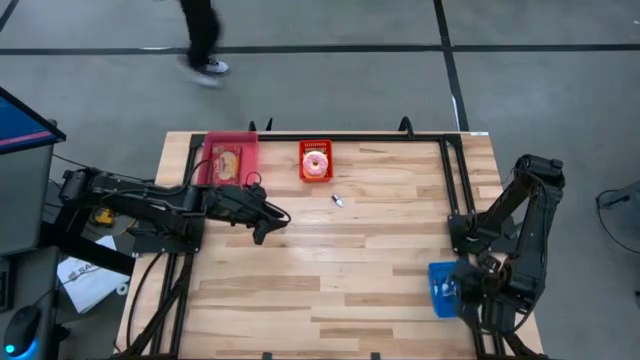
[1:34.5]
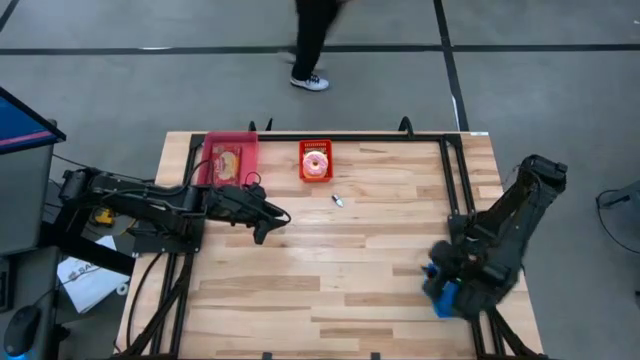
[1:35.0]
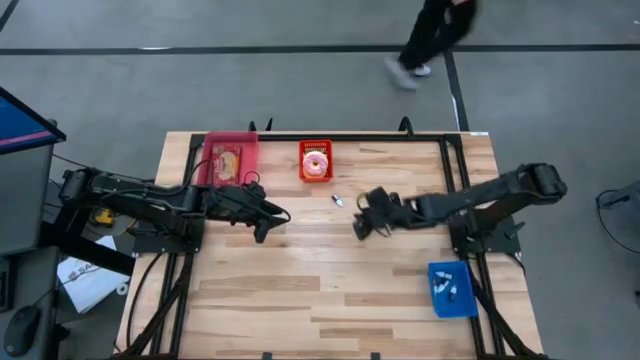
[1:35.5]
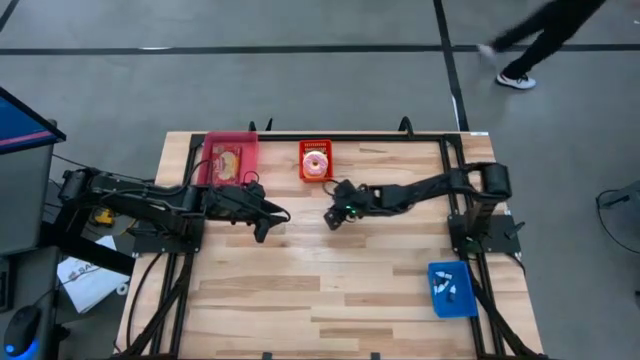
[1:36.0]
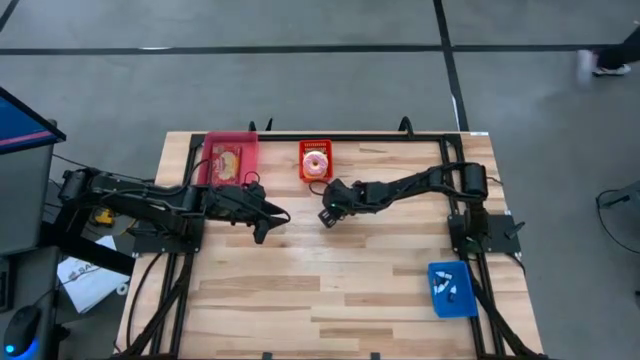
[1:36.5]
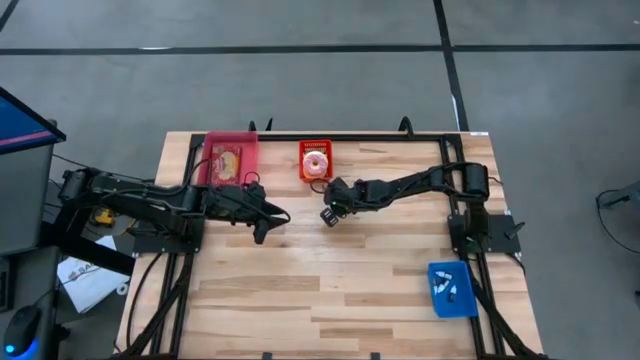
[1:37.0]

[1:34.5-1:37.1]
Put the red food coloring into the blue bin

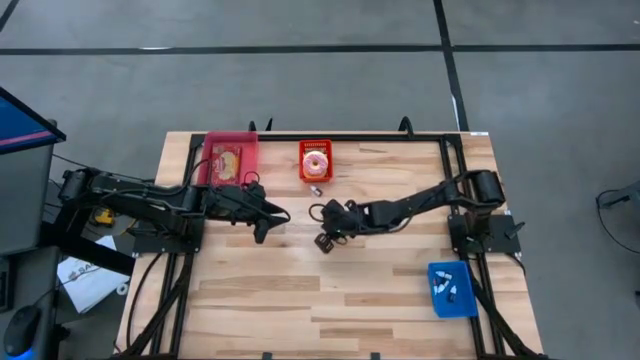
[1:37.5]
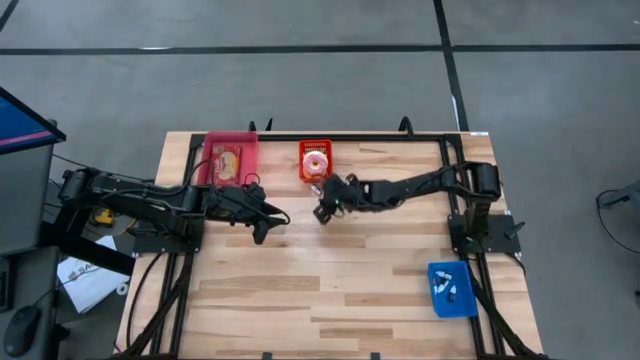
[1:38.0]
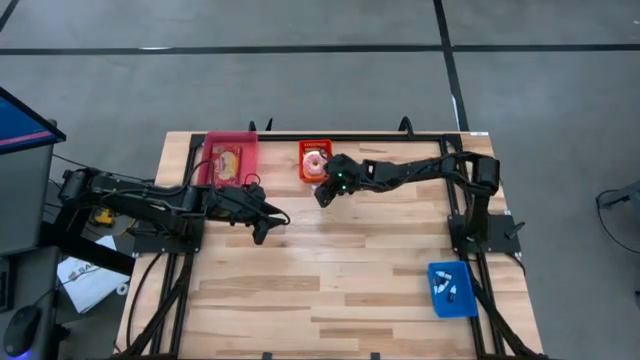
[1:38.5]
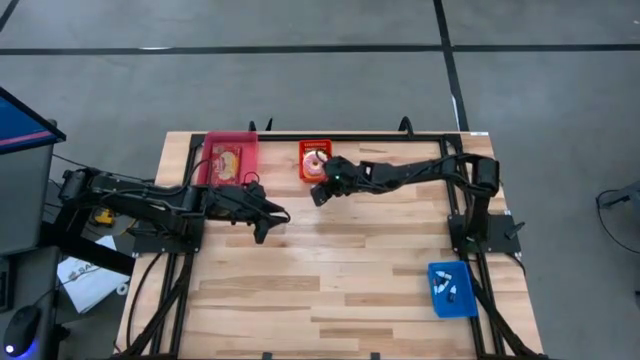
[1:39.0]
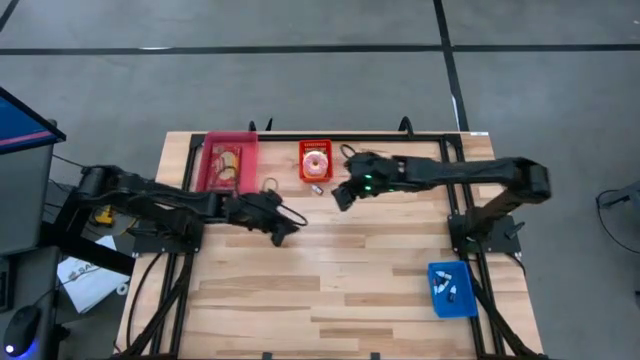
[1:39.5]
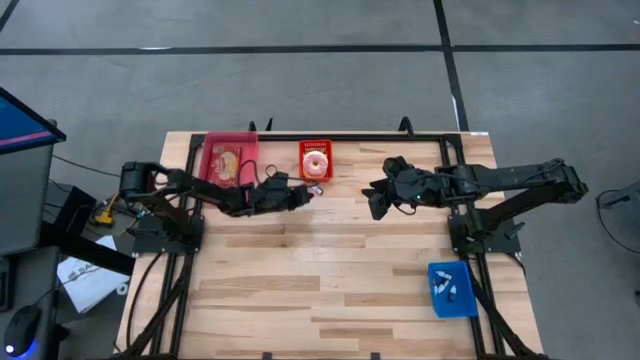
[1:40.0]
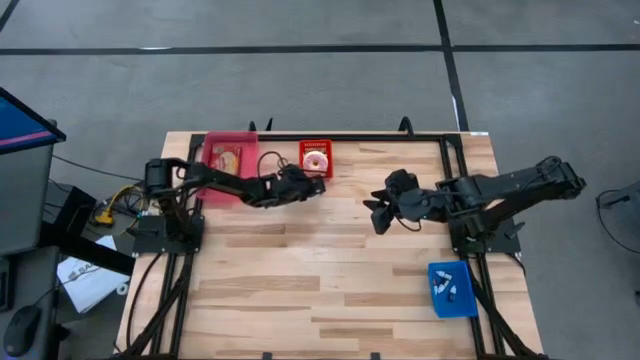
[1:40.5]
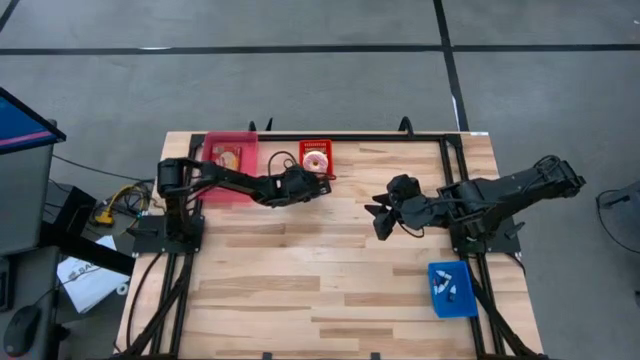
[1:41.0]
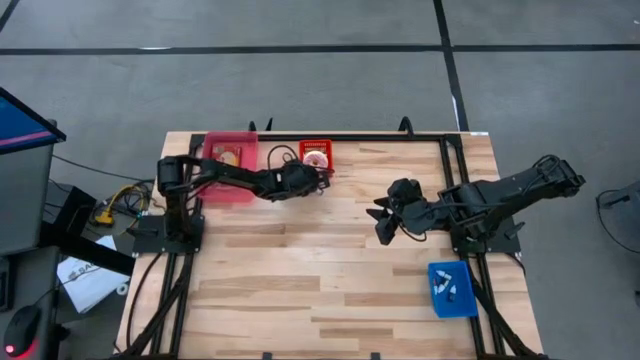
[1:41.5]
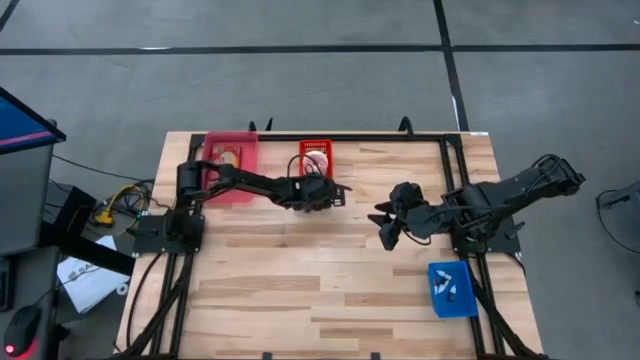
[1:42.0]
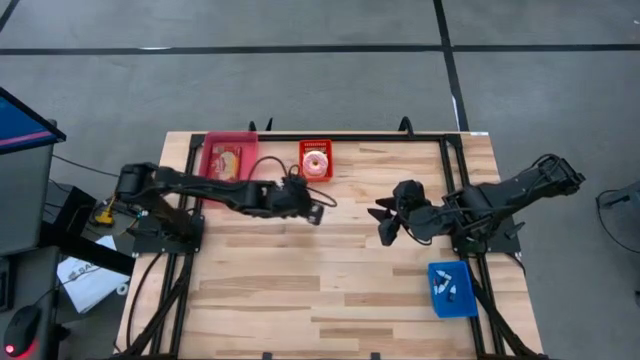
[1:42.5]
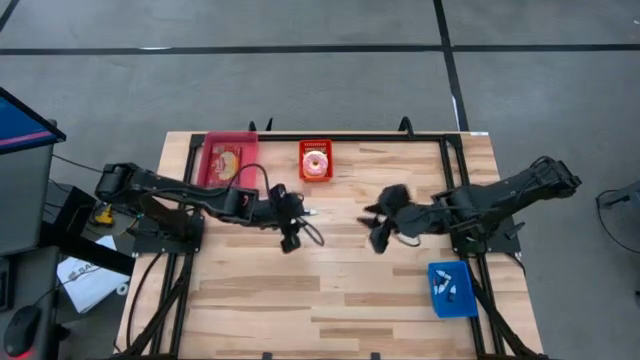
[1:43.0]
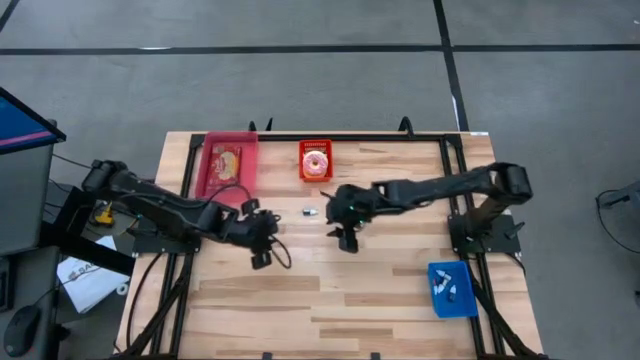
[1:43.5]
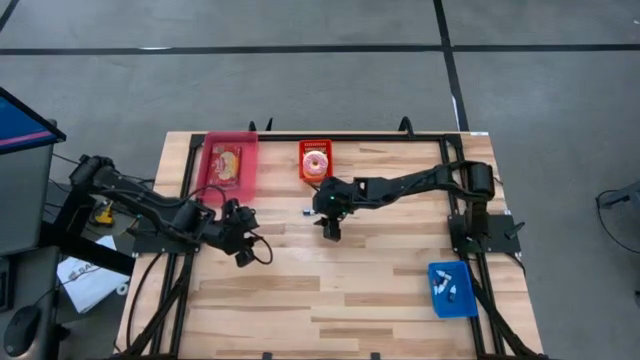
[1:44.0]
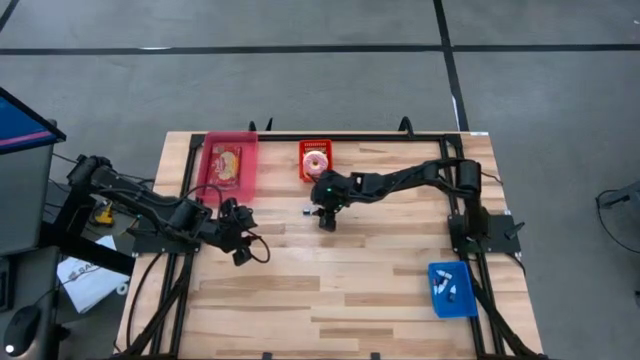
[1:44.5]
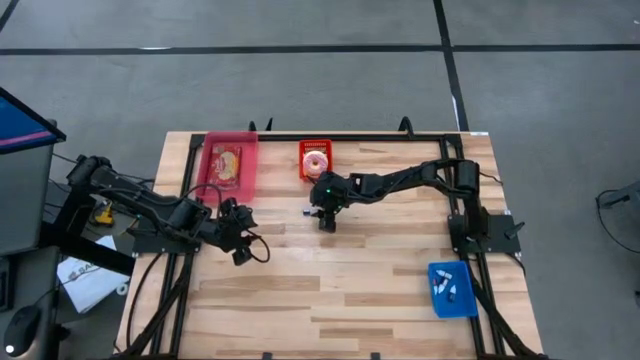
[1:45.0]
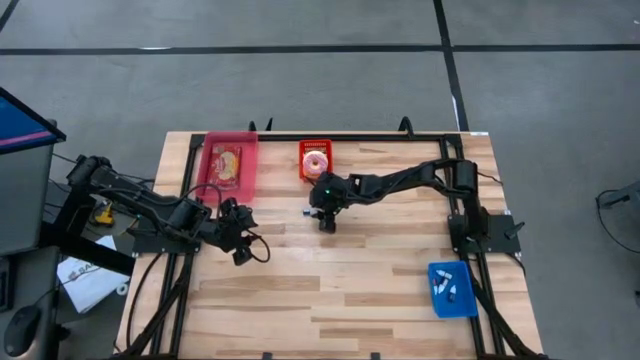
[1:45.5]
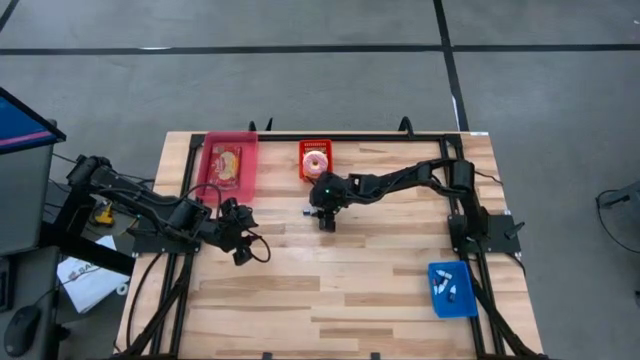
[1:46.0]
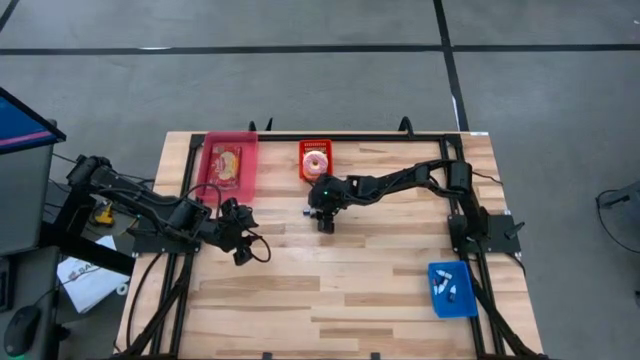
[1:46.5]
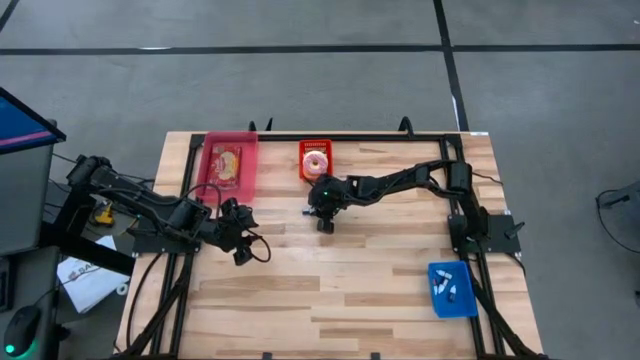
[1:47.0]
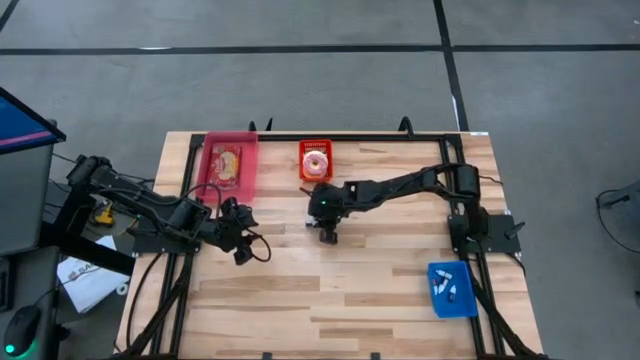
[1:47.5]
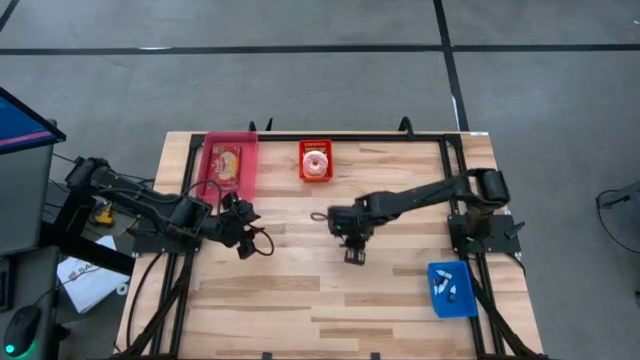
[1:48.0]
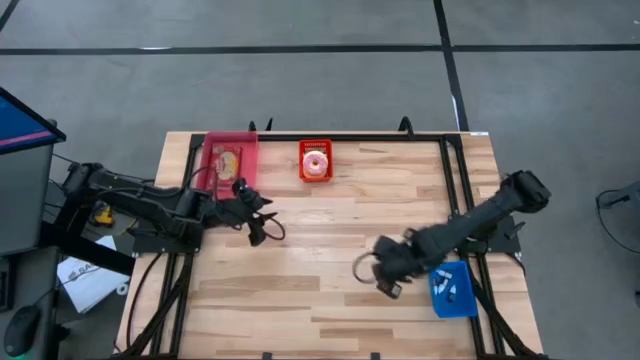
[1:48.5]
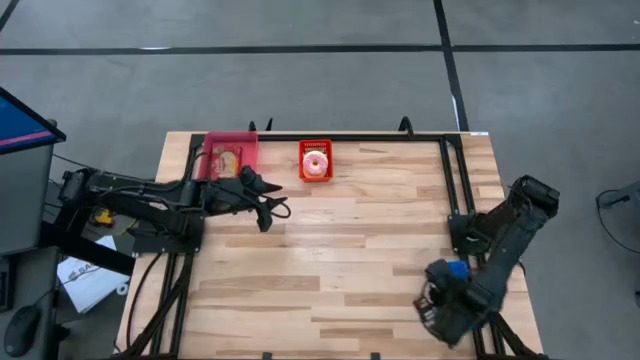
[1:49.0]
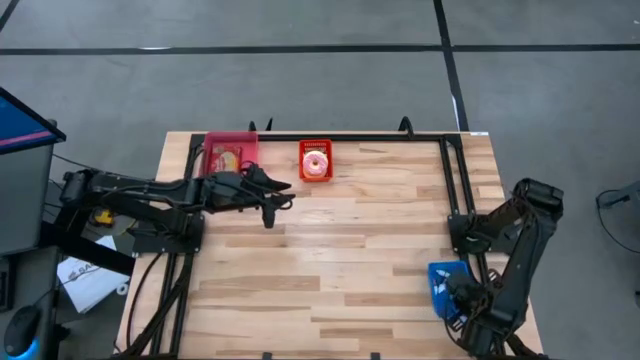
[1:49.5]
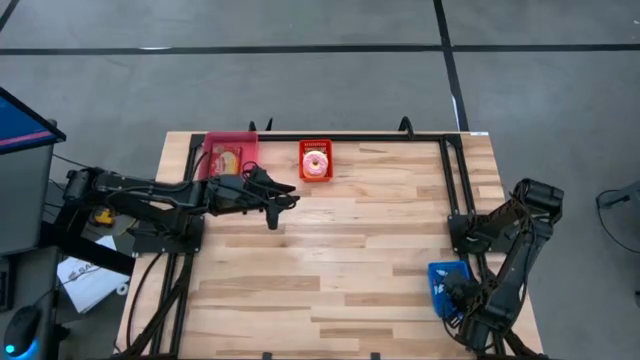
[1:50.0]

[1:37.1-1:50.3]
Put the red food coloring into the blue bin

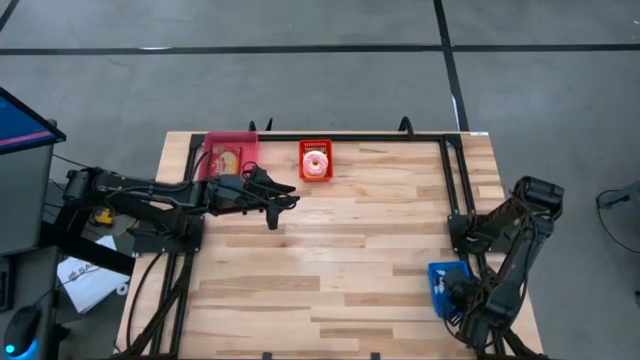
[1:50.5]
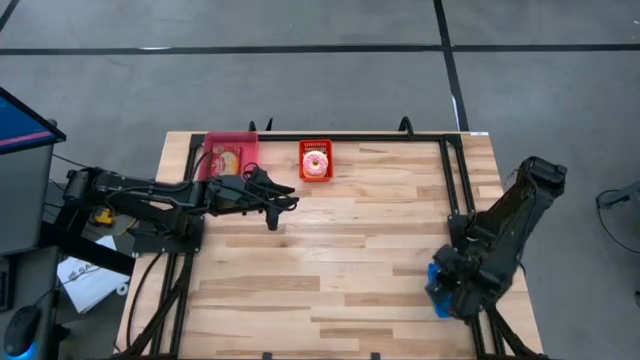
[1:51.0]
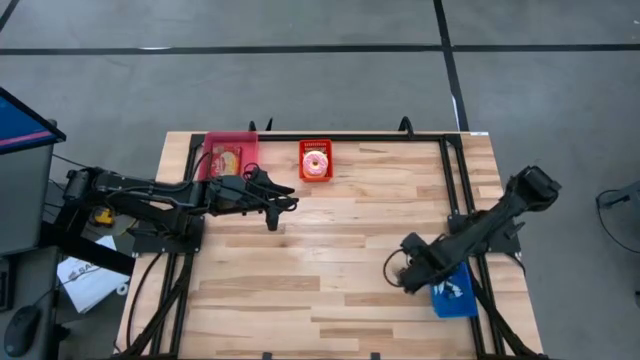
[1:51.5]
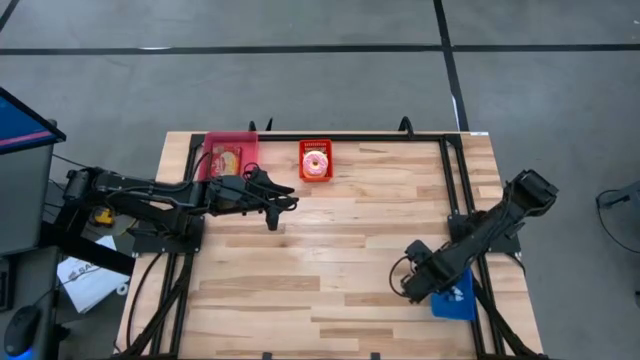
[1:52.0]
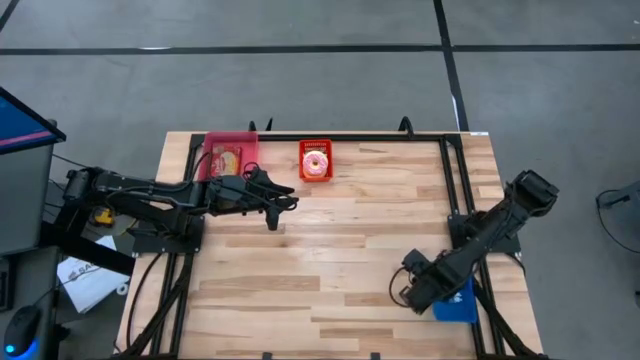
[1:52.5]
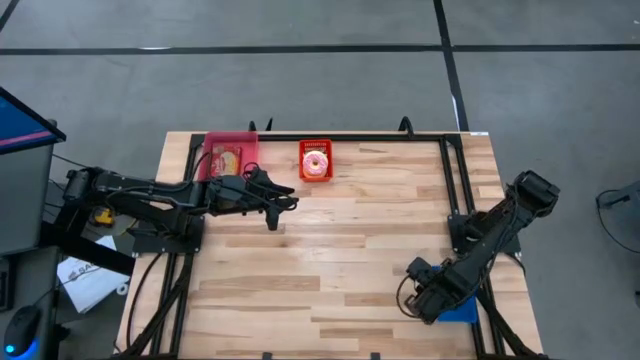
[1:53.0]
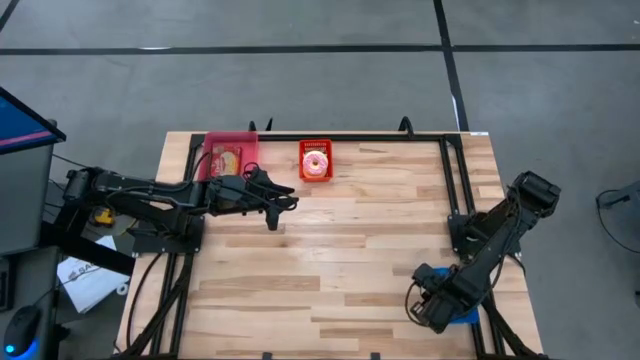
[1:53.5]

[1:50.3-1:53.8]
Adjust the blue bin
